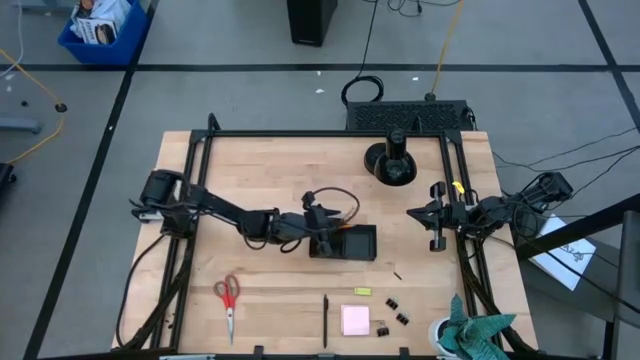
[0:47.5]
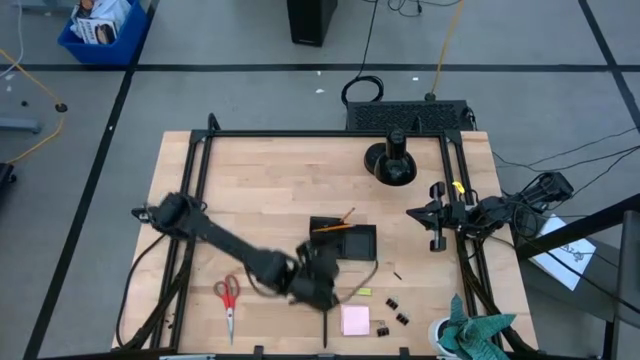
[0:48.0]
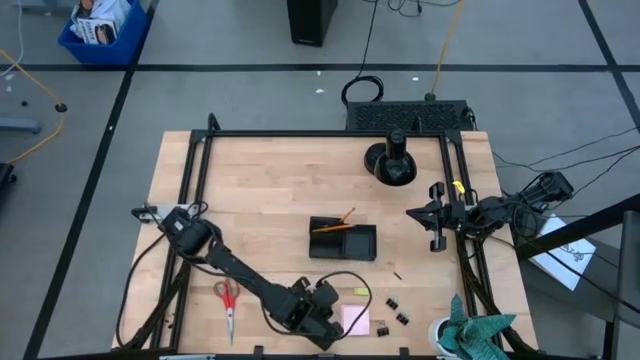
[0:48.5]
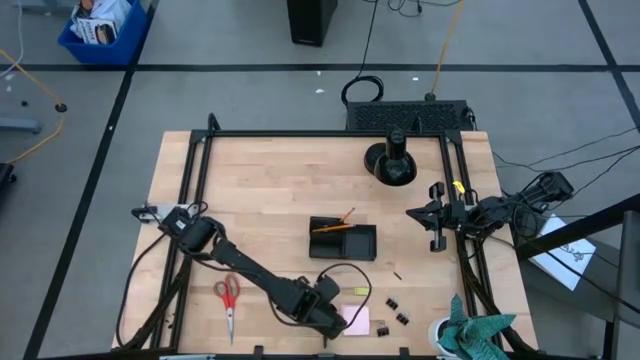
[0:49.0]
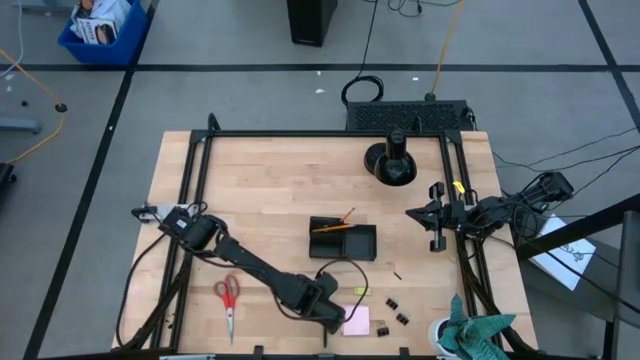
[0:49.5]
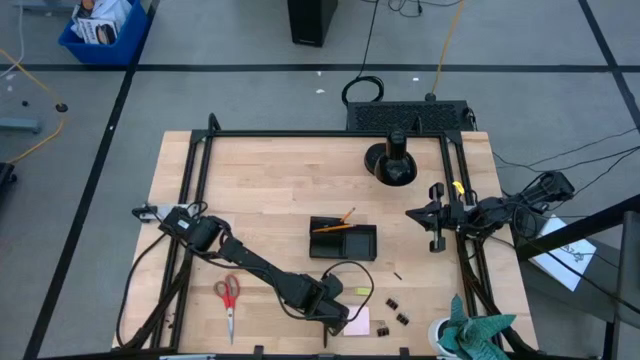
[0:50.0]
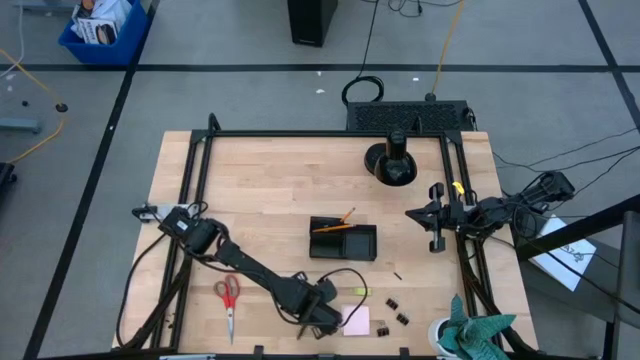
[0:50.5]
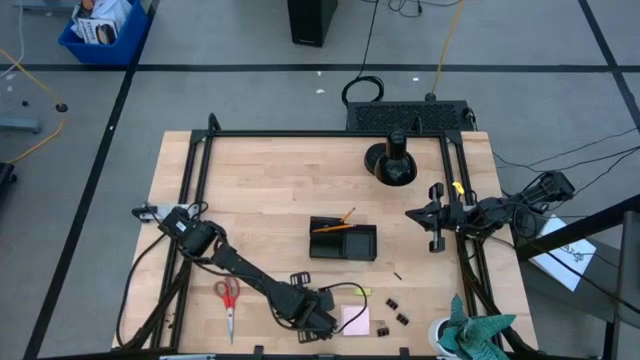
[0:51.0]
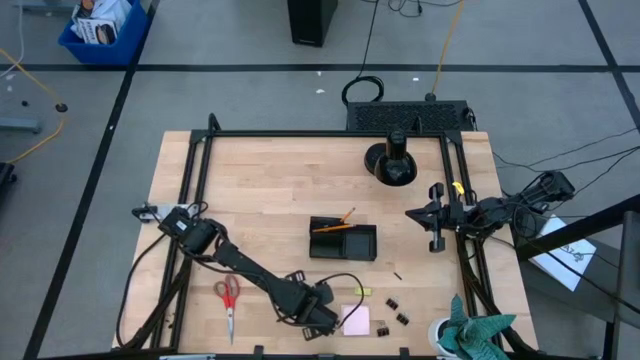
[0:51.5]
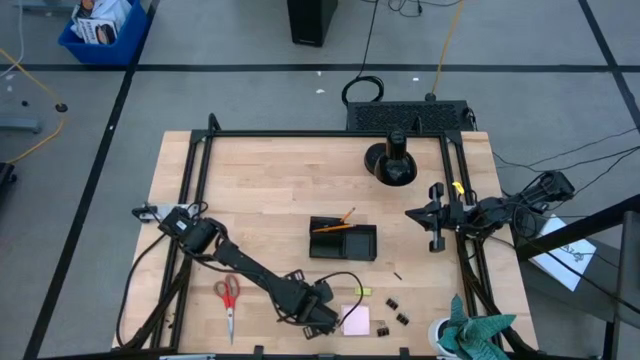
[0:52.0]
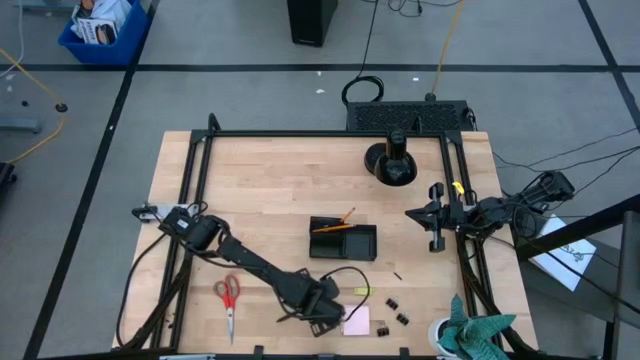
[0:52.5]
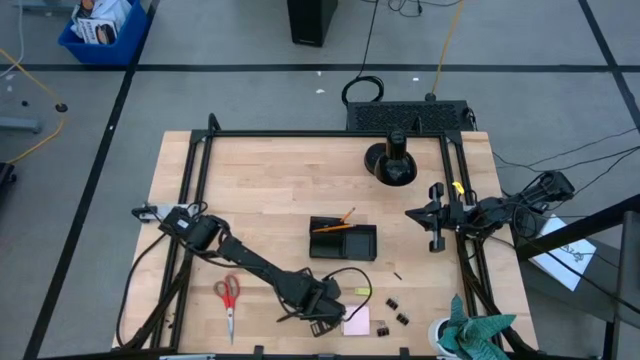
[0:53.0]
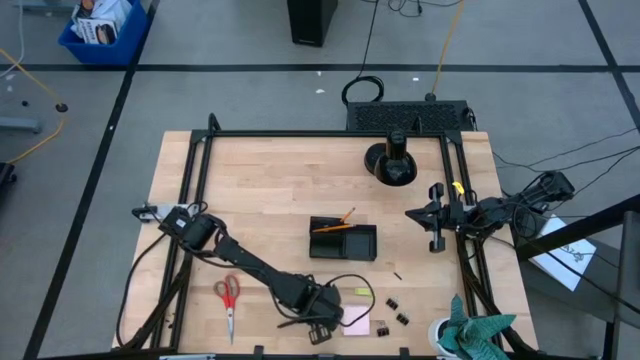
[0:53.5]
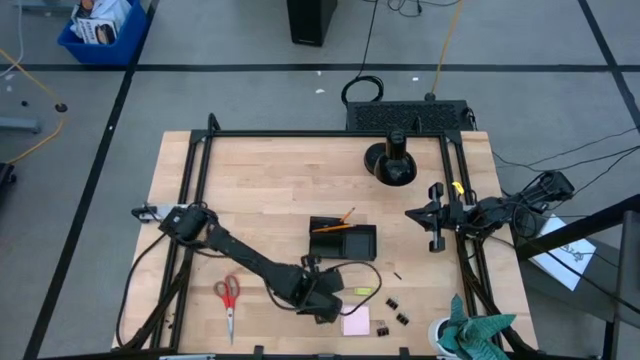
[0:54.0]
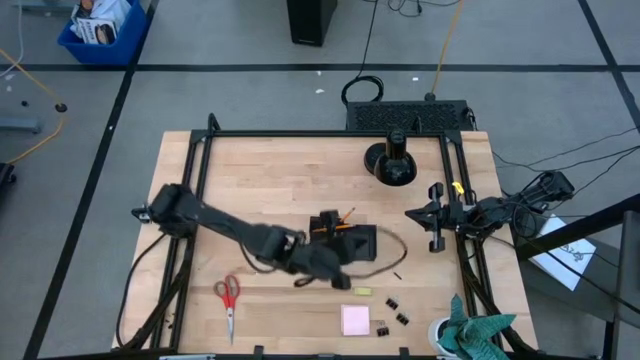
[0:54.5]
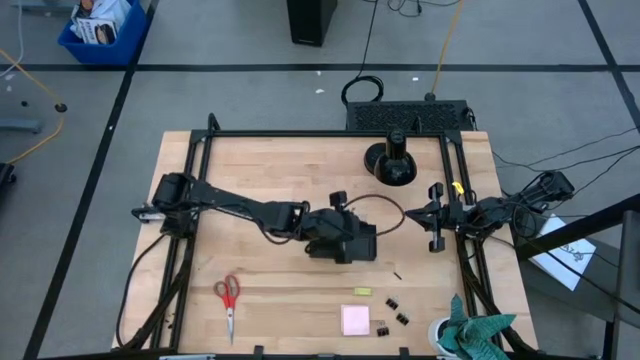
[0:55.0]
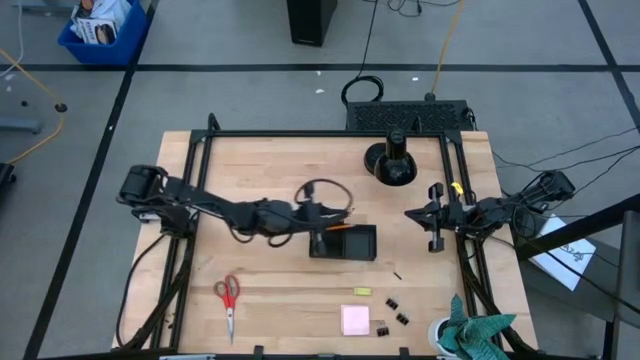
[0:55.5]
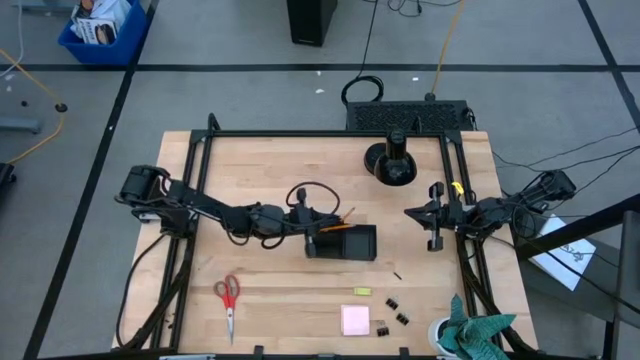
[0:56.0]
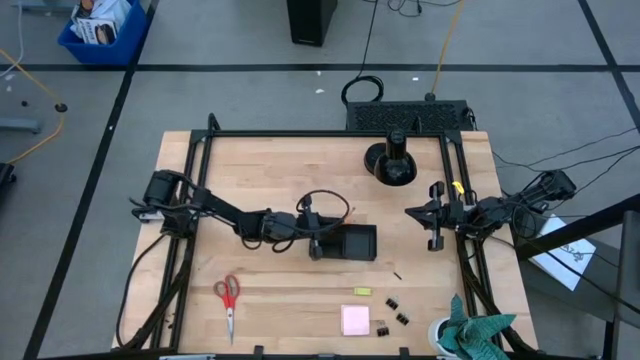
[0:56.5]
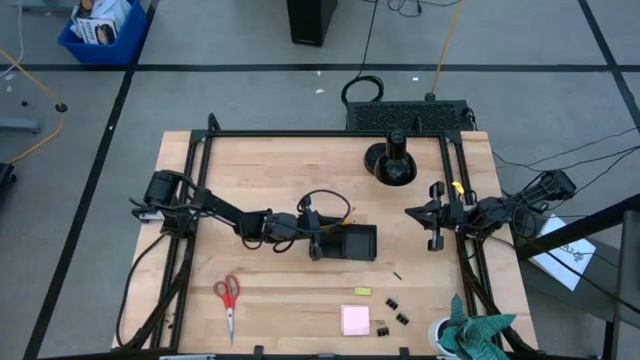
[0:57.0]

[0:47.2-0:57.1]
Task: Pick and place office supplies into organizer
Put the black pen into the black desk organizer

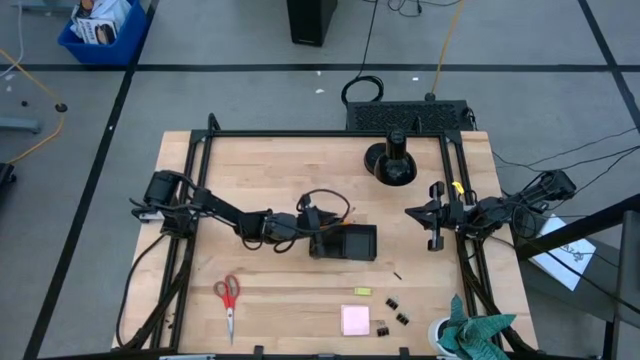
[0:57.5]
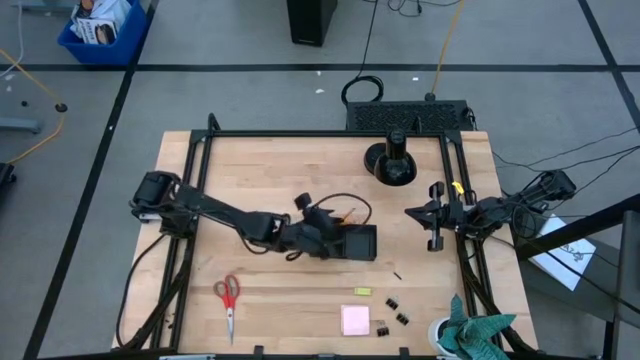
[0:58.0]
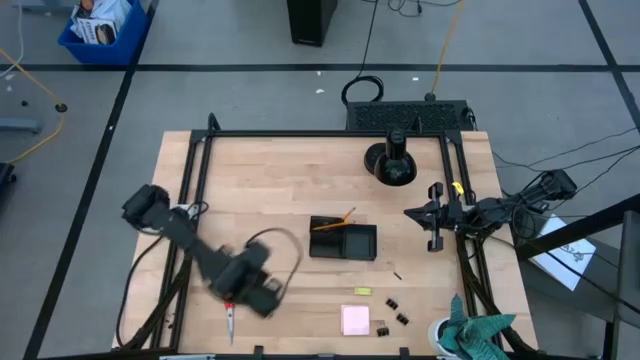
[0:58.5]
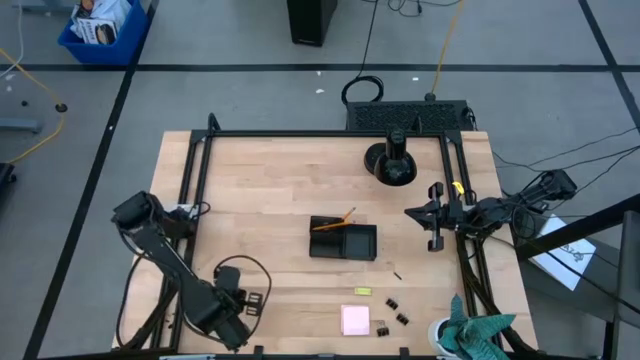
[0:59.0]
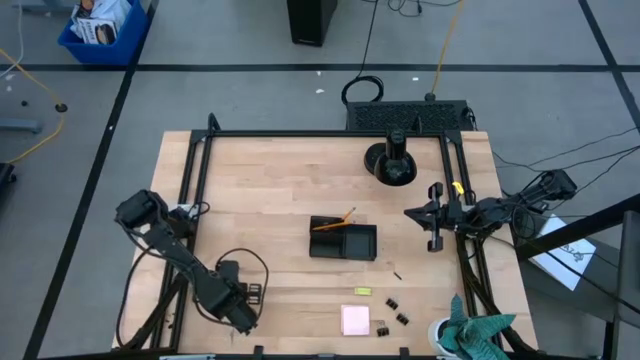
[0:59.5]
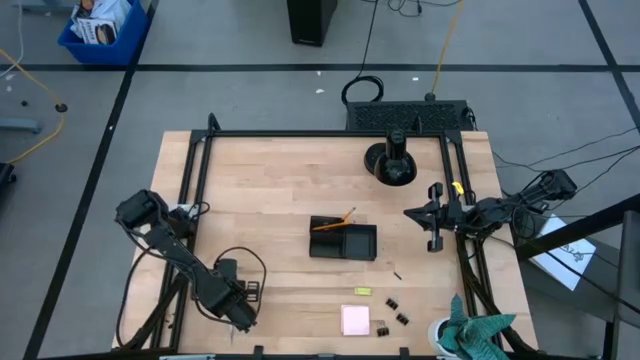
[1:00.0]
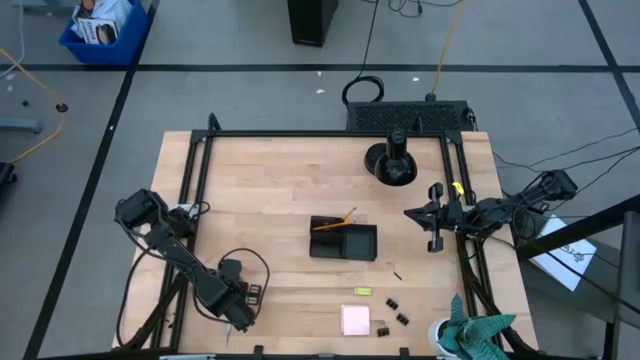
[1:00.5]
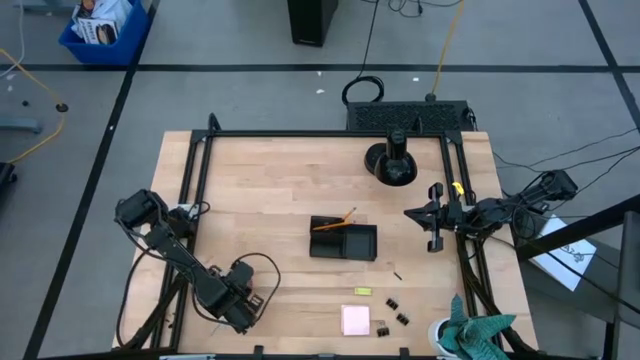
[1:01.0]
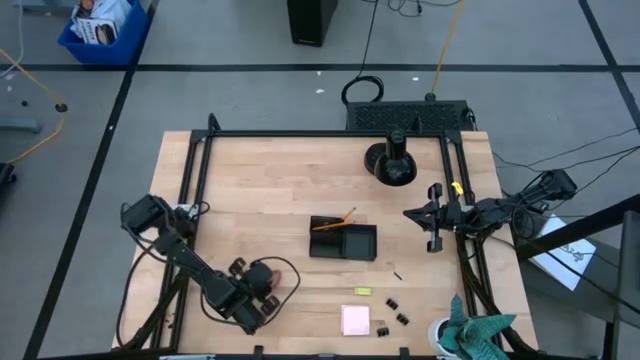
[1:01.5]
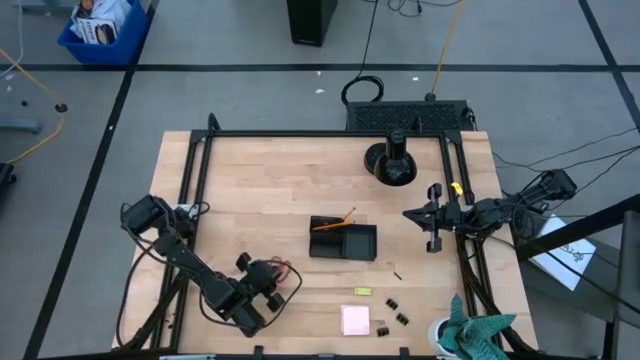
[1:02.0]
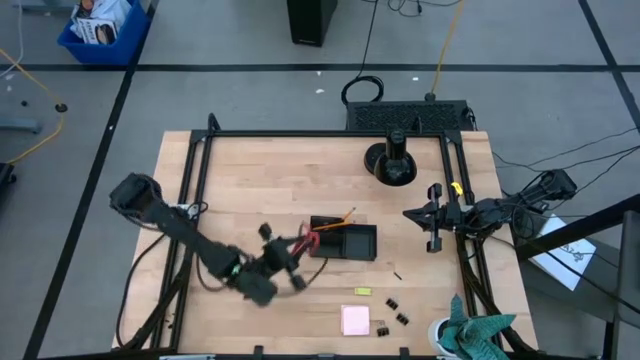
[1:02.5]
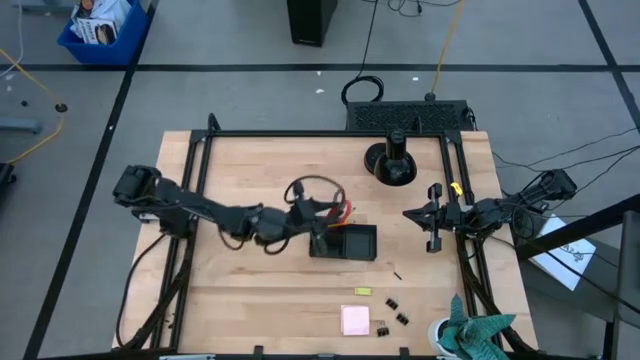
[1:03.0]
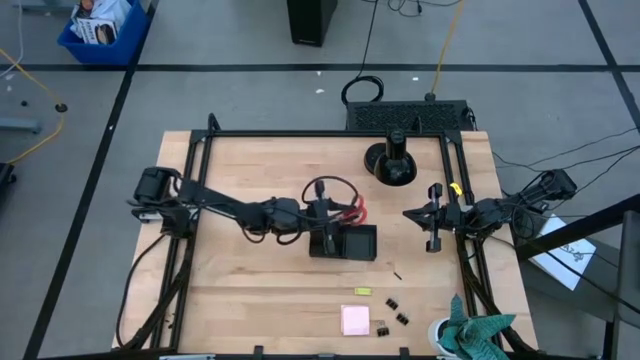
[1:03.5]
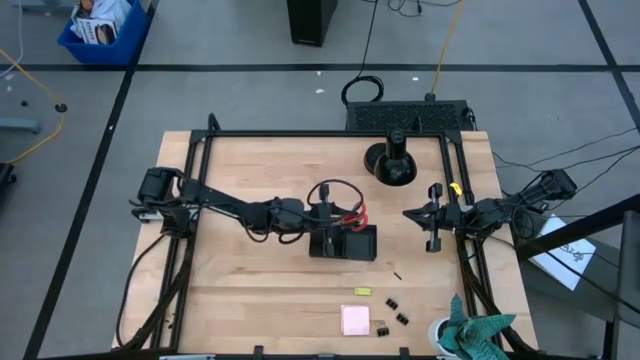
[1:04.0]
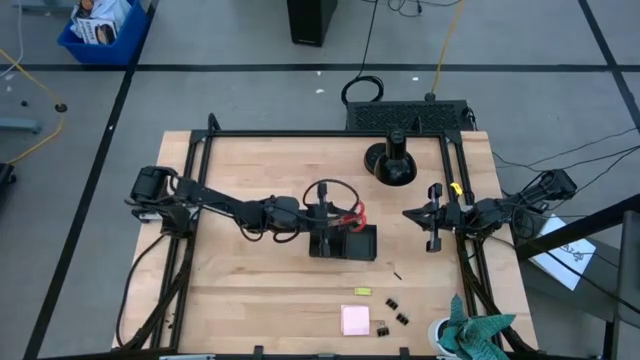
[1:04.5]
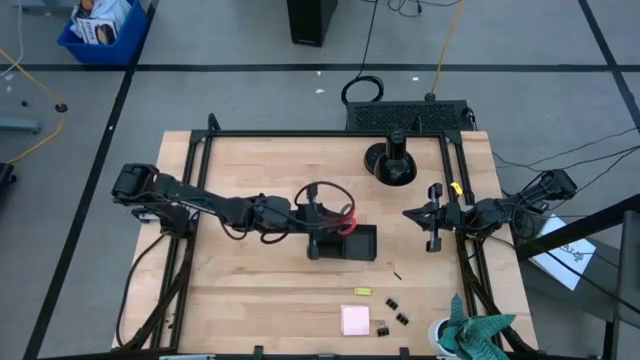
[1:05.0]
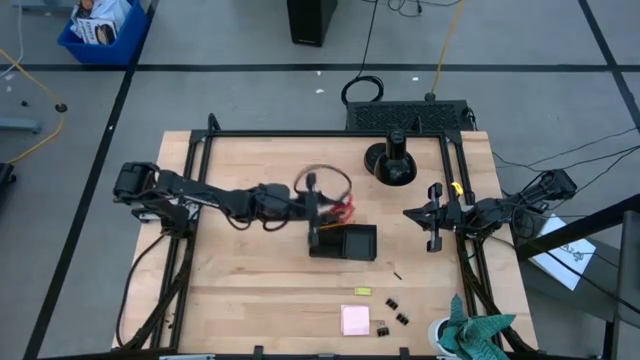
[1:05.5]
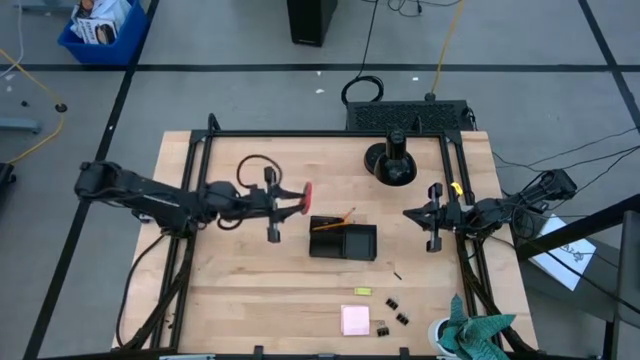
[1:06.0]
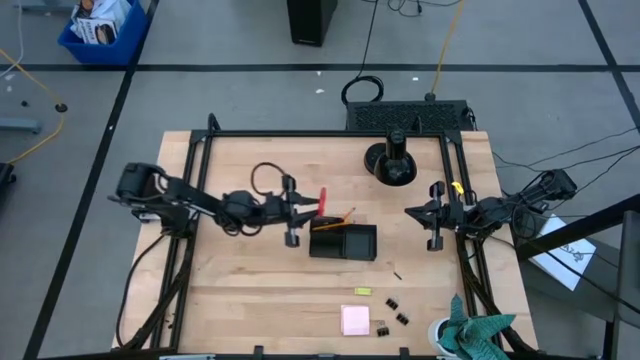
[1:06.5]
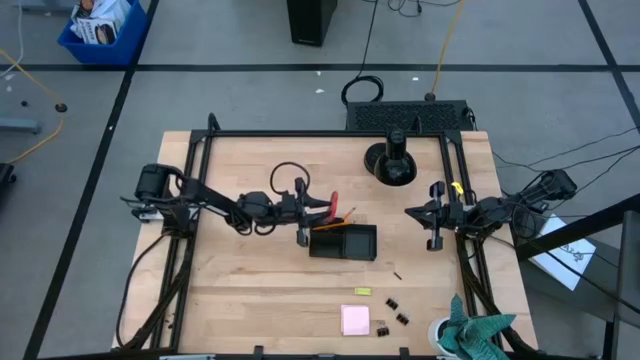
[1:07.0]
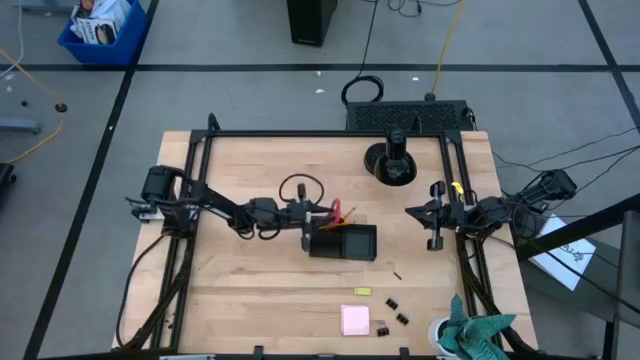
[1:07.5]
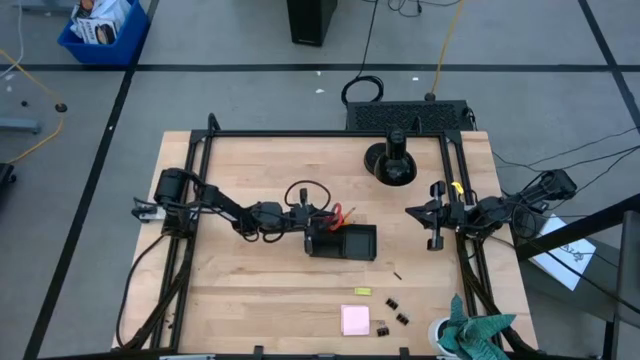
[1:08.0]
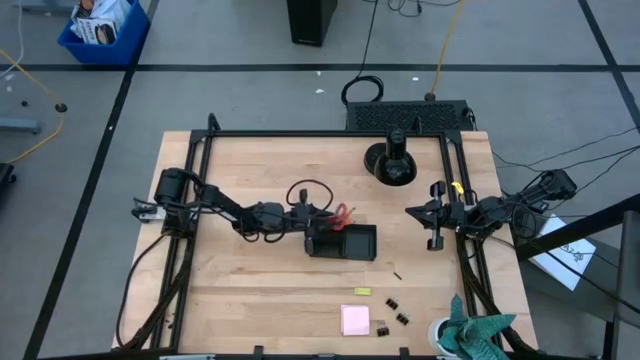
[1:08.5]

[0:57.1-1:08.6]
Put the red scissors into the black desk organizer
